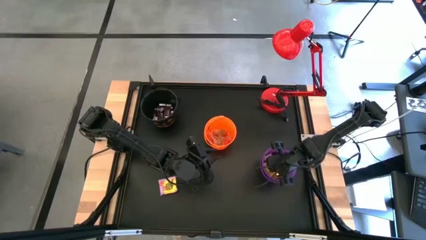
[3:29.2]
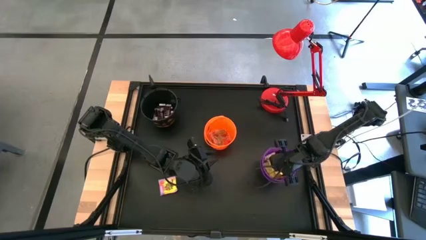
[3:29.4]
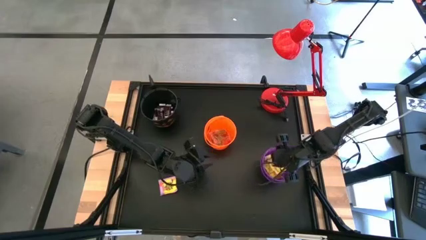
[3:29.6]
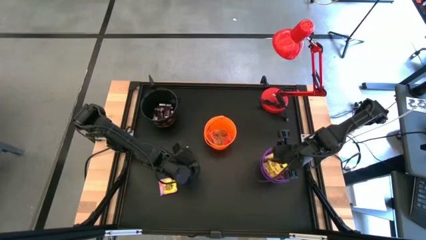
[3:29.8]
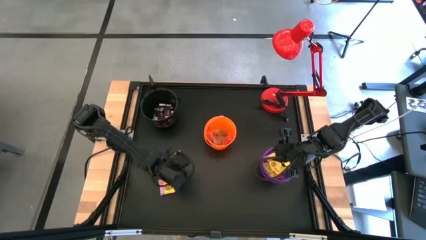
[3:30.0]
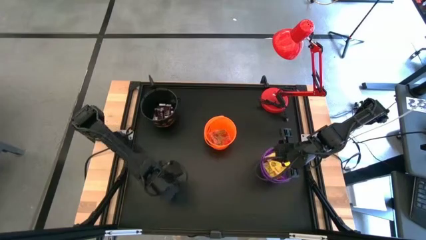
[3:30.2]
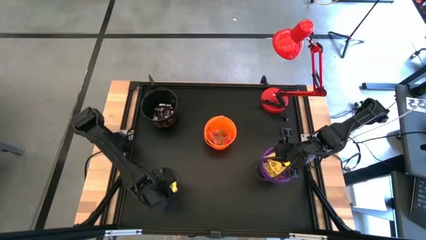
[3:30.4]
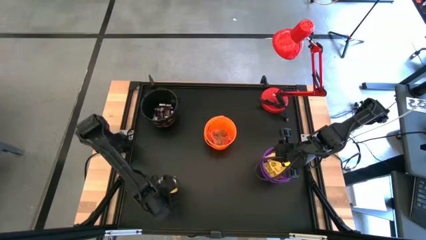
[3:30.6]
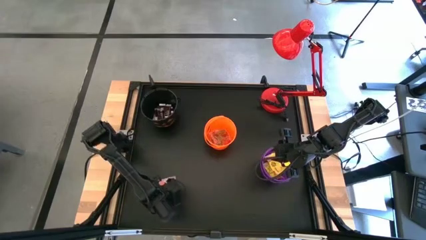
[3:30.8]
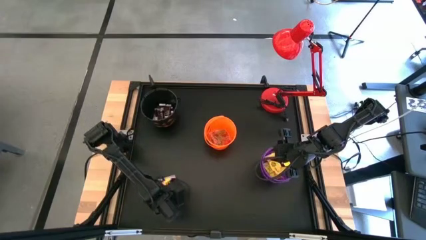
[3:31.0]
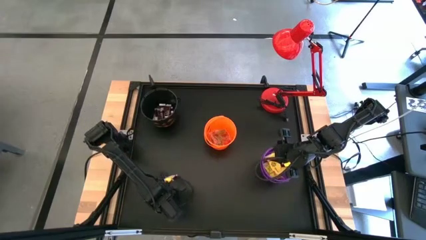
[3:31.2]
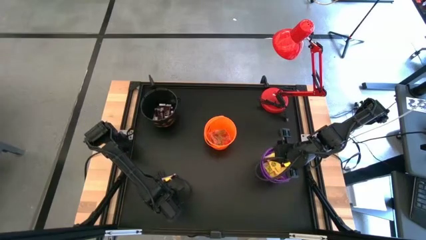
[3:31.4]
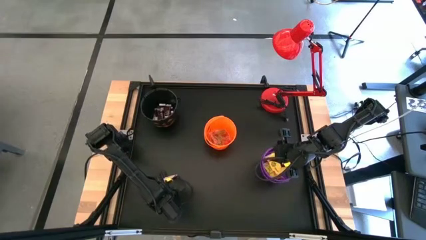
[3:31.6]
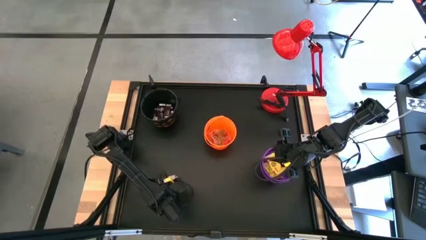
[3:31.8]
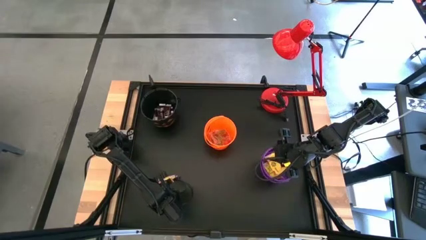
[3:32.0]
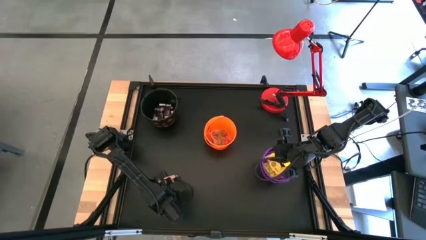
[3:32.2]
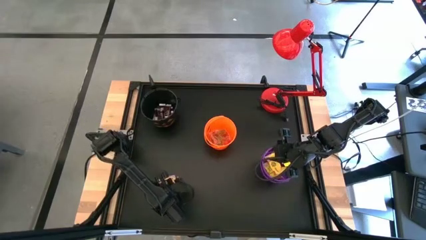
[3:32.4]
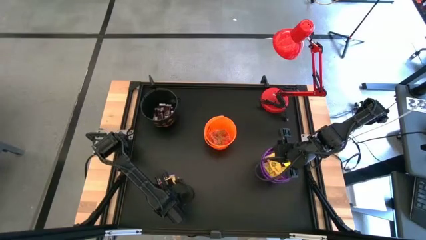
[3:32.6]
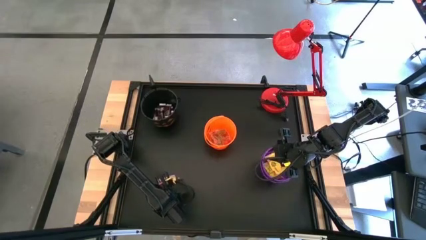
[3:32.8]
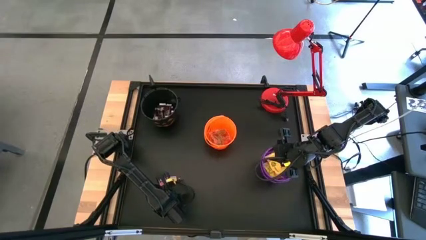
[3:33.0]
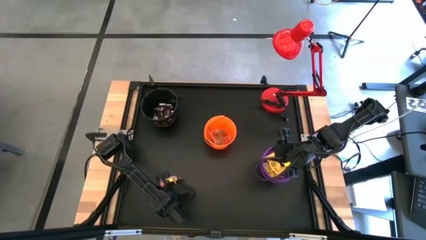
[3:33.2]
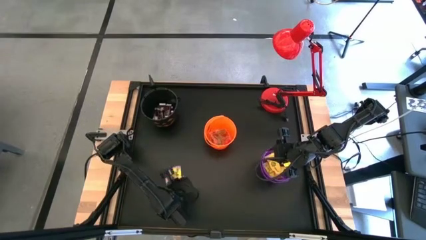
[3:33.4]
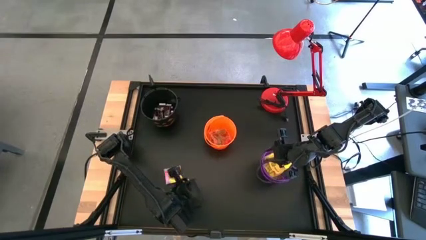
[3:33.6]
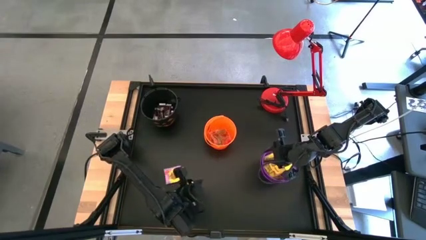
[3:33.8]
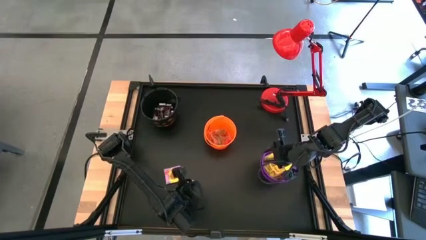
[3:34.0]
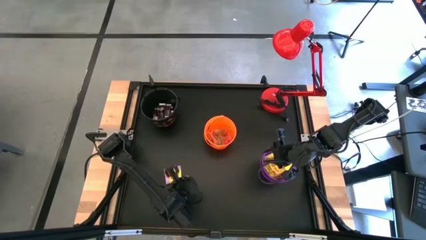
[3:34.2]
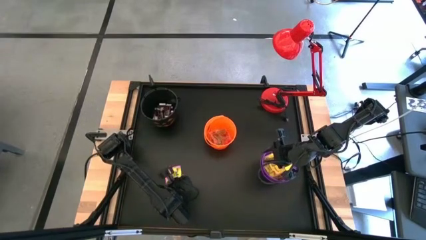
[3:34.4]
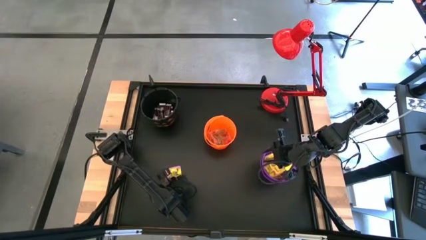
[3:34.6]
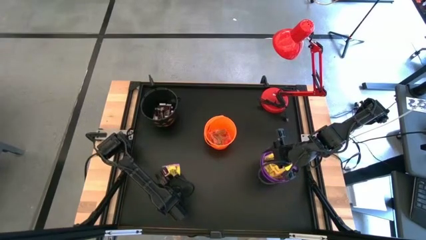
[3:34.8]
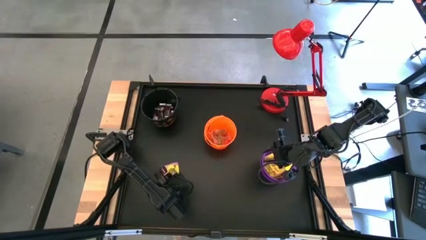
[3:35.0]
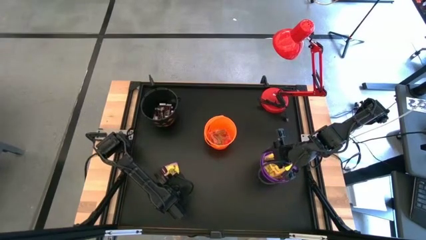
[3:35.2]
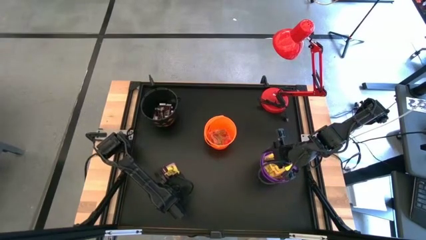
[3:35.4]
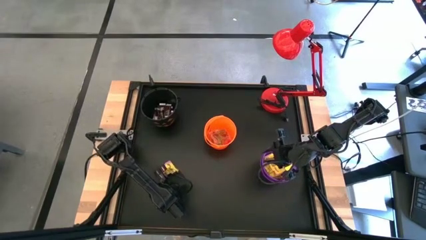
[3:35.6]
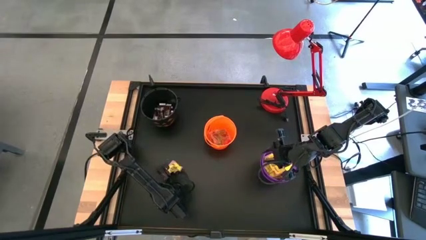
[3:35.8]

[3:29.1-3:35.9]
Task: Sort candy
Put the yellow candy into the purple bucket

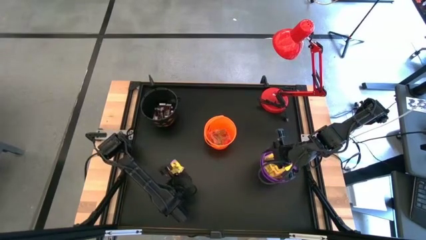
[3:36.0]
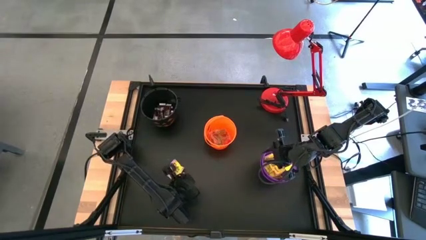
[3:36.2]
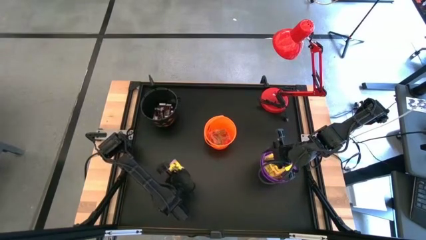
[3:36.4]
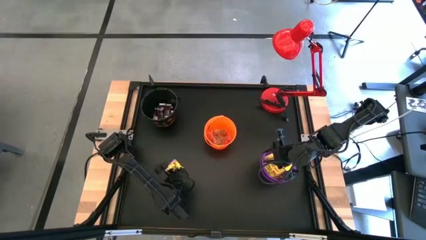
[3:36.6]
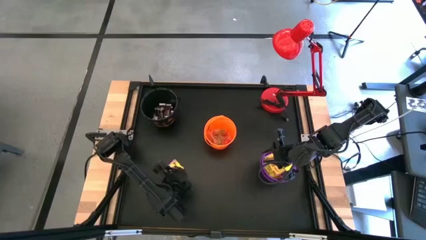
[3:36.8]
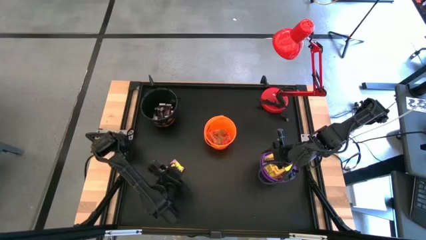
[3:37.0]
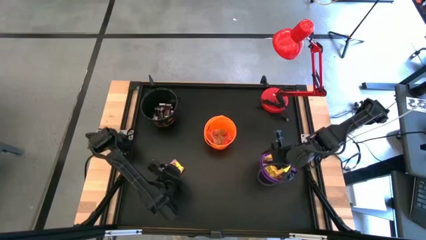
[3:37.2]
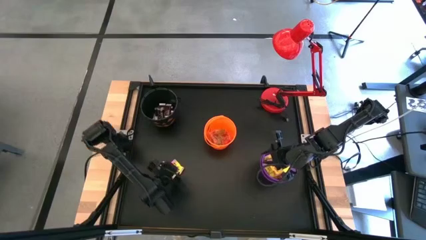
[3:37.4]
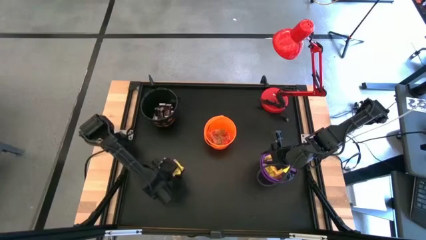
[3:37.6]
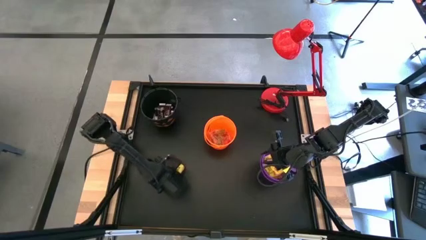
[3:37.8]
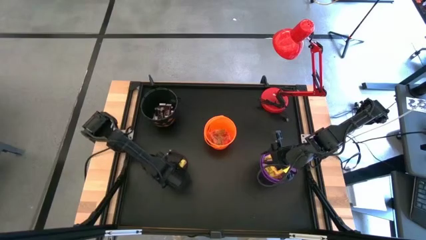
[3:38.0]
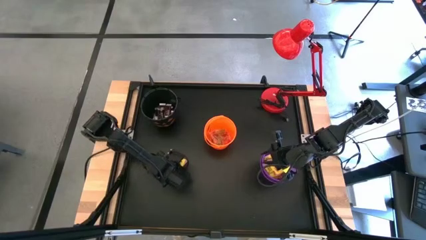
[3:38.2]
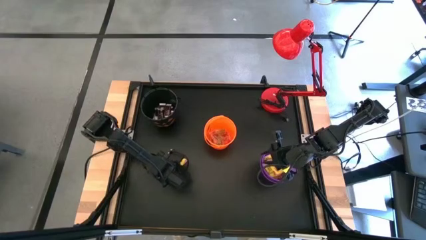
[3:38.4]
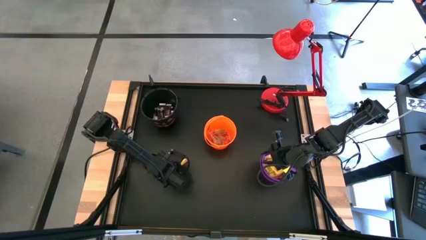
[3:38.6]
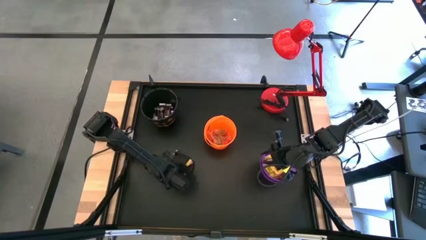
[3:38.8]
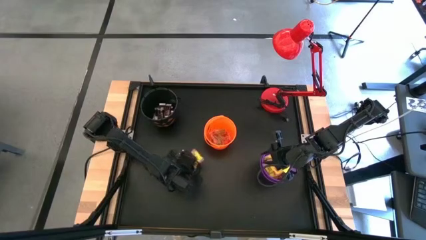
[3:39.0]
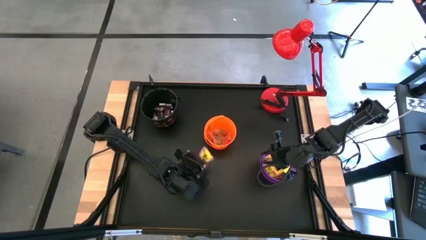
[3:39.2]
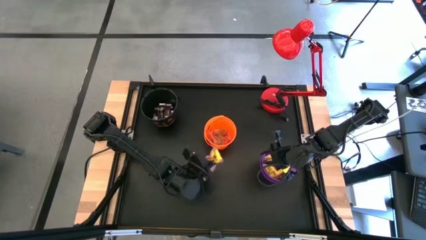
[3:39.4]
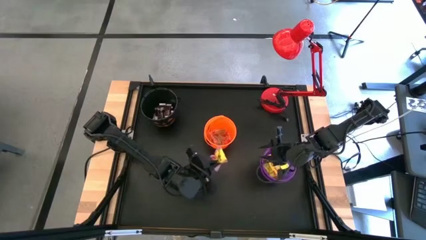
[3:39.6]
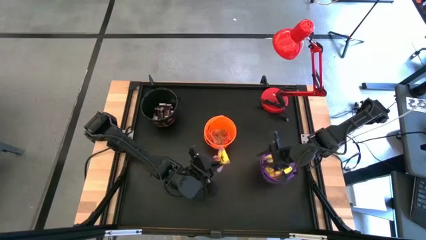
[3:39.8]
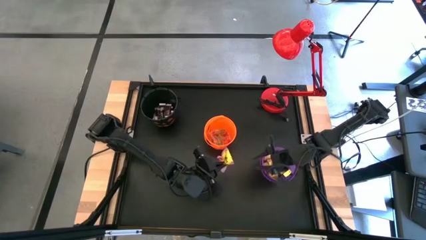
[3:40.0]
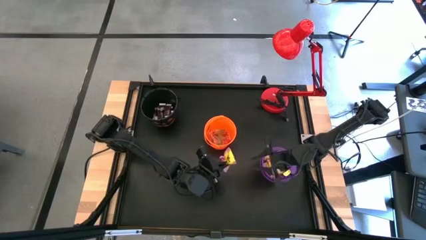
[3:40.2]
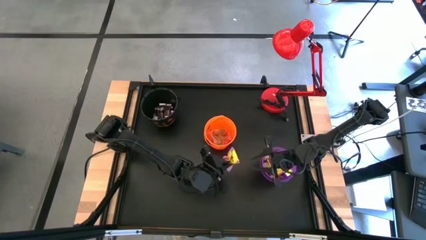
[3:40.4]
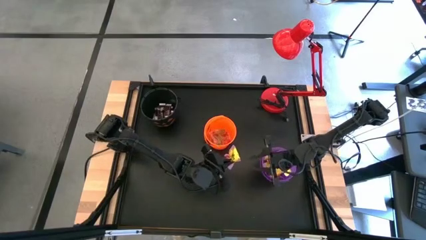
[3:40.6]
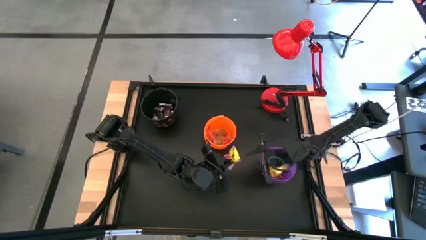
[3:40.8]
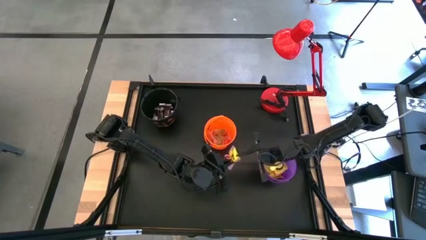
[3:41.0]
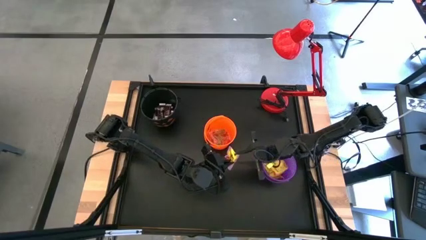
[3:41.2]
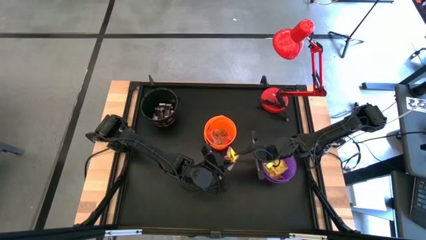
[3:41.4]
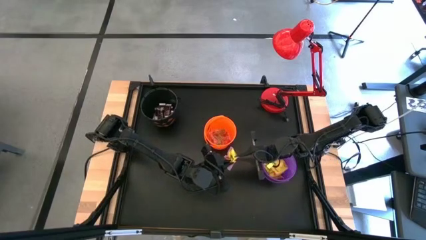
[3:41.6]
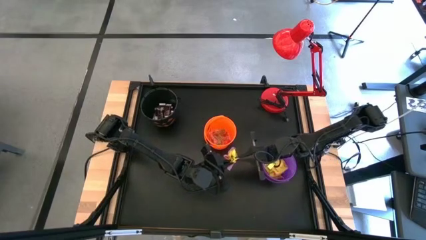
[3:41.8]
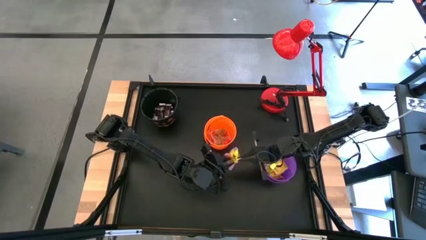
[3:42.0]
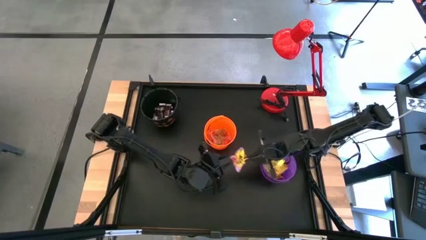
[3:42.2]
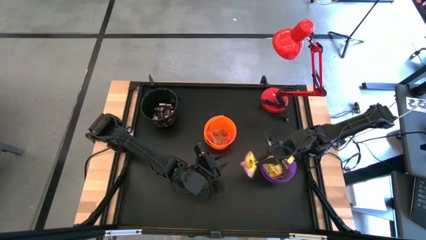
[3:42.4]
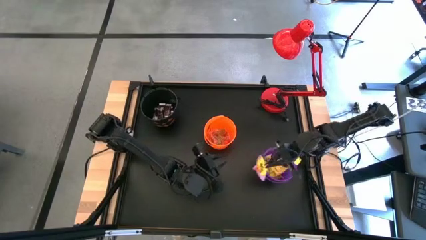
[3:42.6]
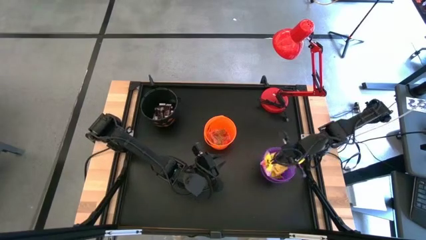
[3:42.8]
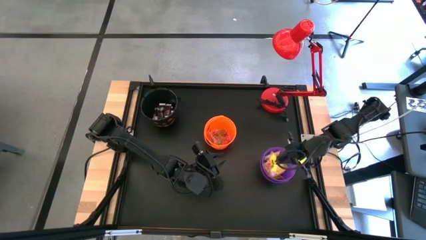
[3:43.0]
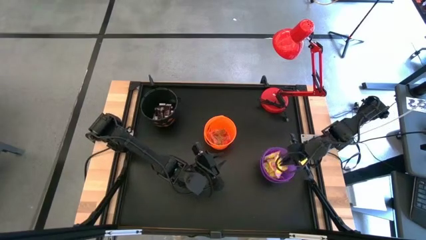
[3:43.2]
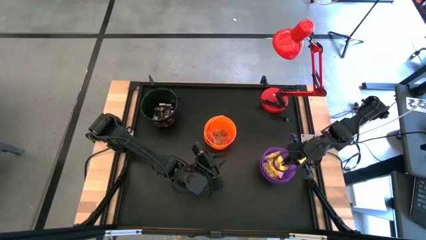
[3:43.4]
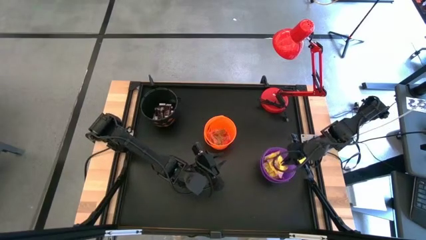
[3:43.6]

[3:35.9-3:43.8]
Put the yellow candy into the purple bucket

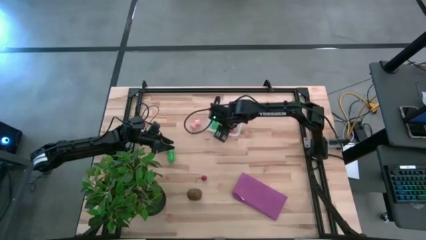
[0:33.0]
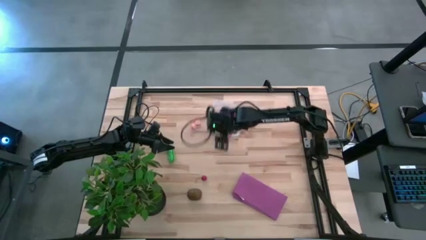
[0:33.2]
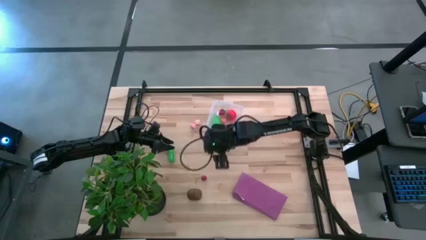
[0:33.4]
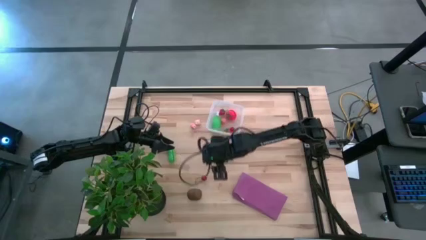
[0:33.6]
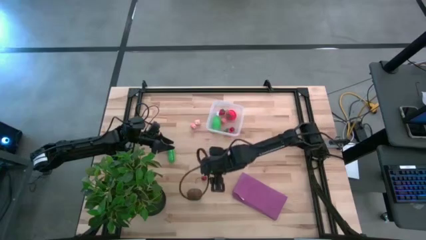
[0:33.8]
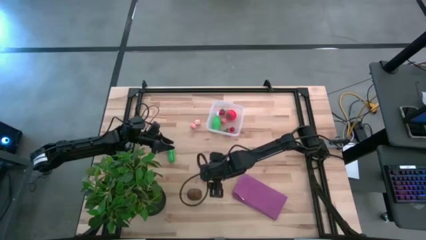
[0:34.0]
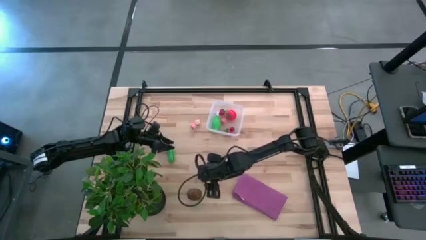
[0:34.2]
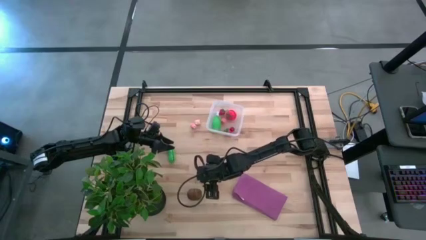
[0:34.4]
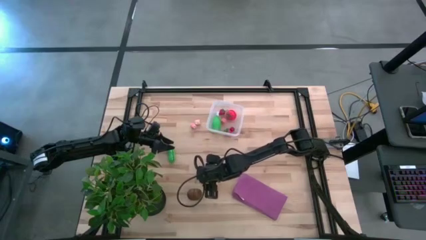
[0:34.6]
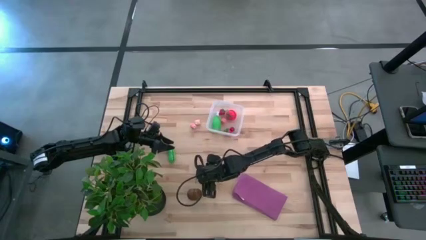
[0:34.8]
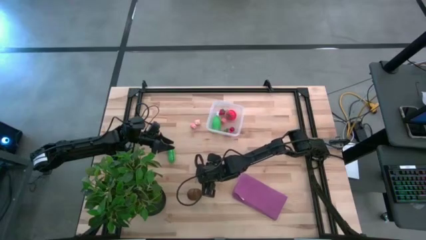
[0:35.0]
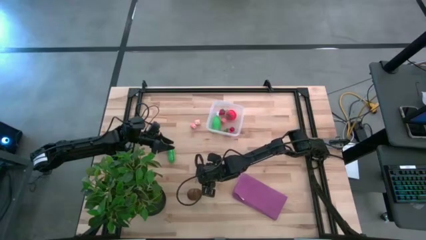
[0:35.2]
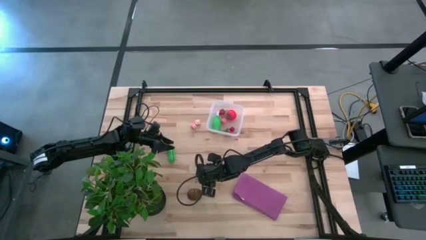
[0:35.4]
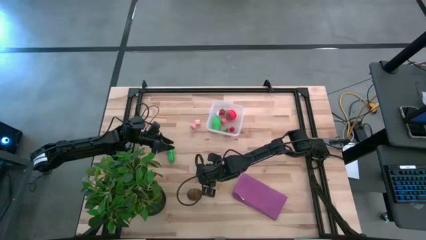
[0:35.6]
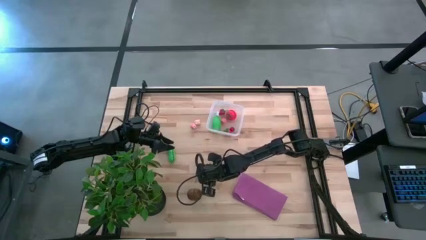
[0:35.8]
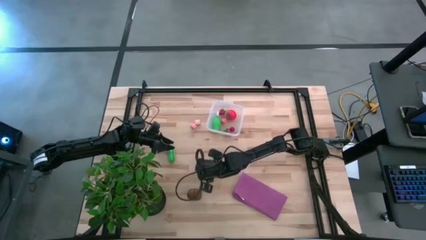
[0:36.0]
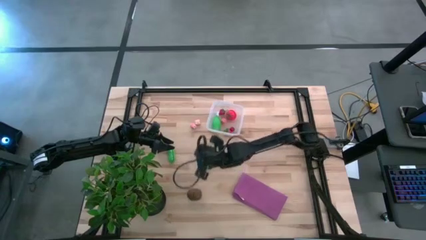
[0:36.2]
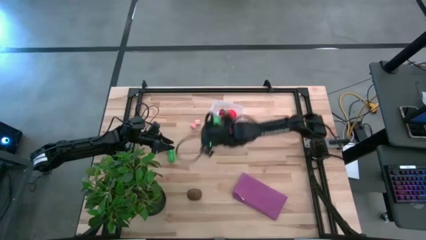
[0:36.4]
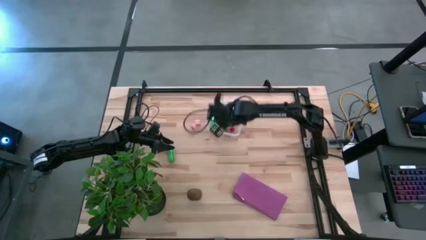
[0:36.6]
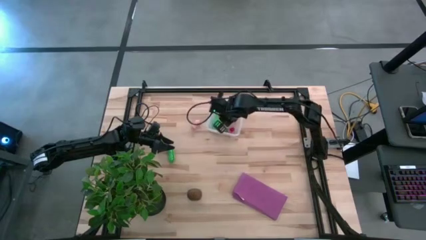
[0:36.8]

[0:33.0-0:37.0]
Task: Pick and placing Produce into tupperware
Put the red cherry in the transparent bin
